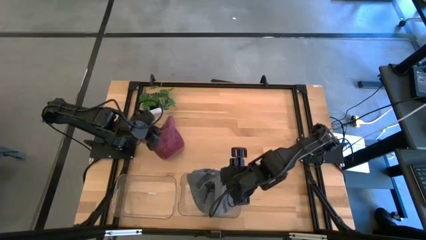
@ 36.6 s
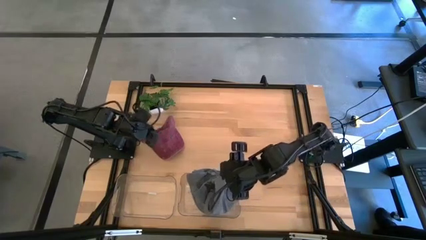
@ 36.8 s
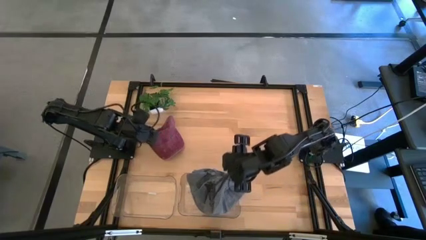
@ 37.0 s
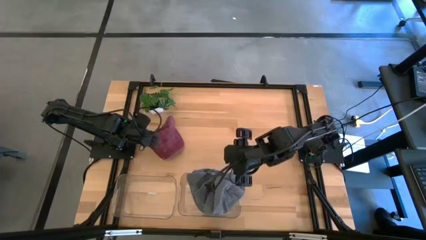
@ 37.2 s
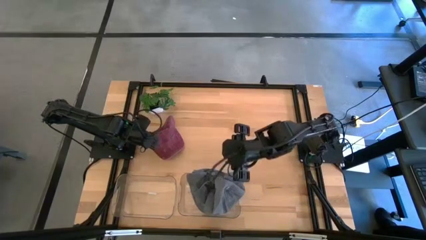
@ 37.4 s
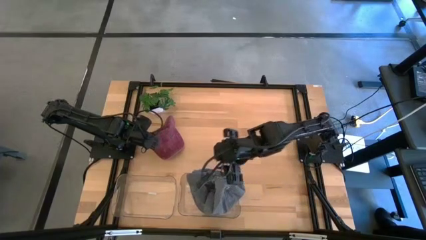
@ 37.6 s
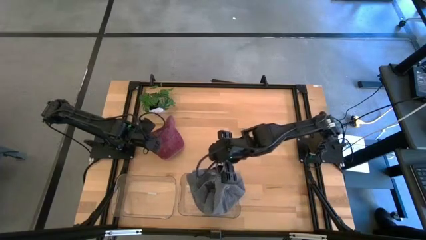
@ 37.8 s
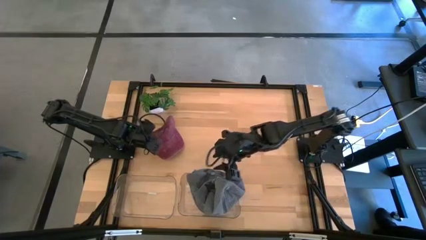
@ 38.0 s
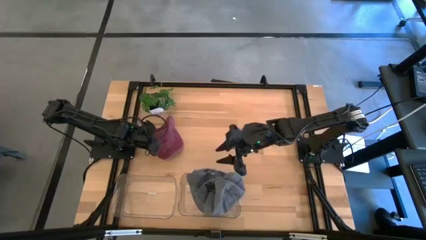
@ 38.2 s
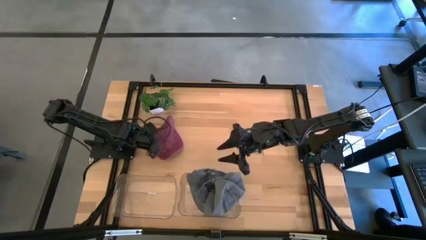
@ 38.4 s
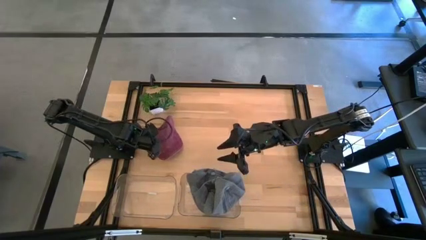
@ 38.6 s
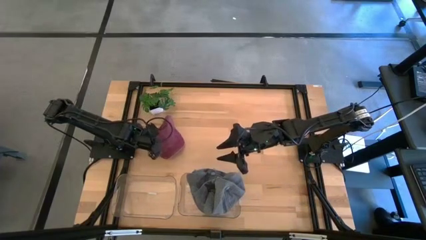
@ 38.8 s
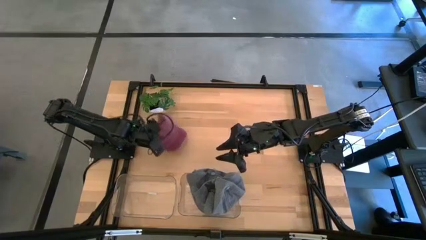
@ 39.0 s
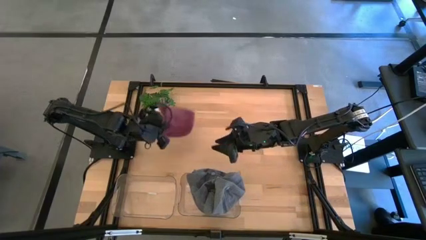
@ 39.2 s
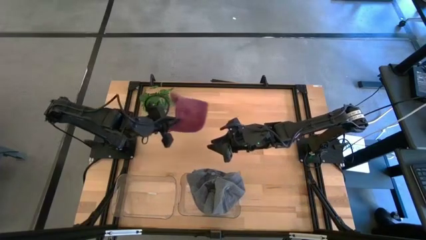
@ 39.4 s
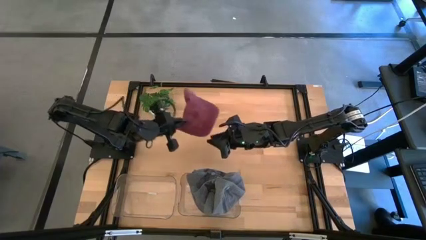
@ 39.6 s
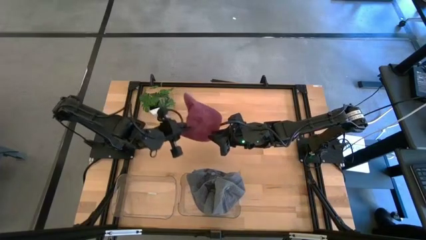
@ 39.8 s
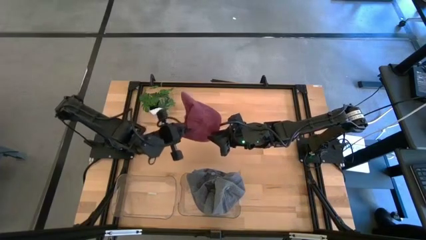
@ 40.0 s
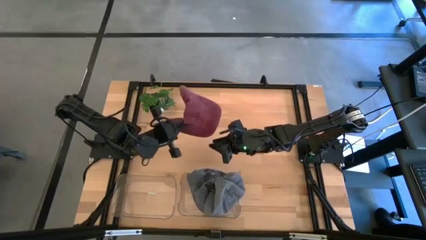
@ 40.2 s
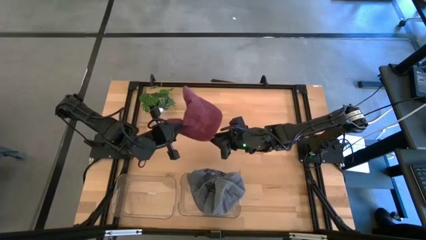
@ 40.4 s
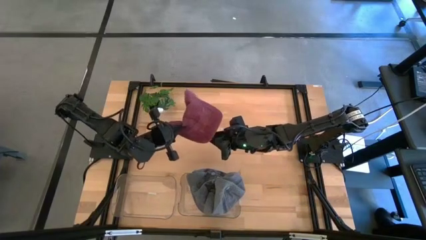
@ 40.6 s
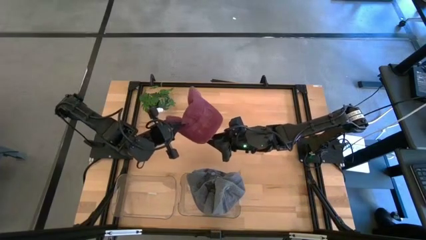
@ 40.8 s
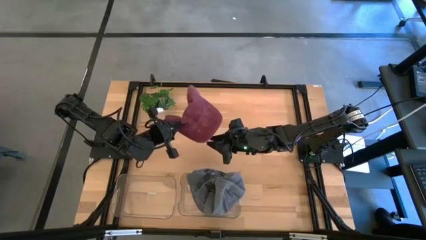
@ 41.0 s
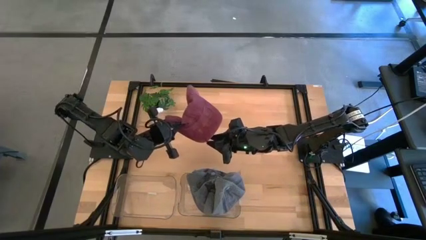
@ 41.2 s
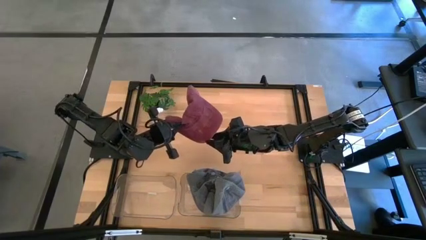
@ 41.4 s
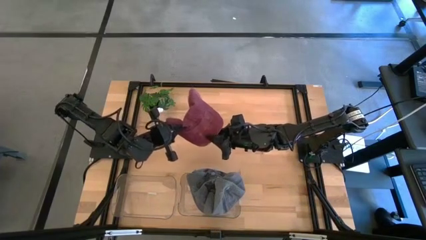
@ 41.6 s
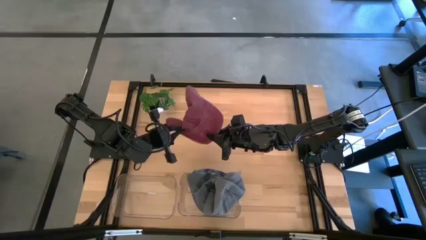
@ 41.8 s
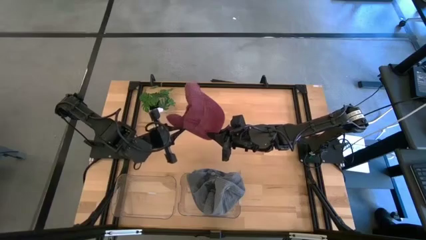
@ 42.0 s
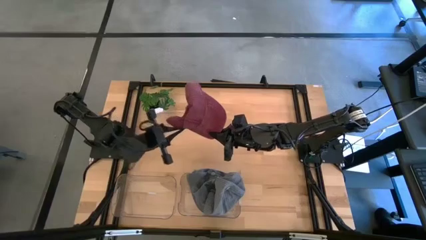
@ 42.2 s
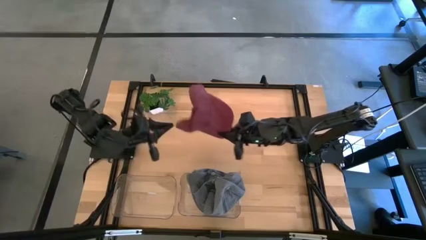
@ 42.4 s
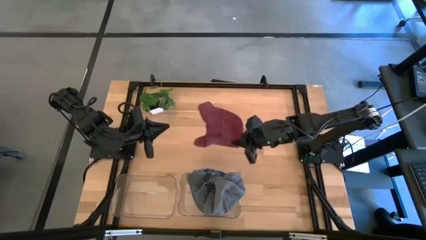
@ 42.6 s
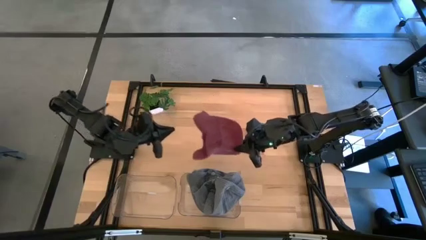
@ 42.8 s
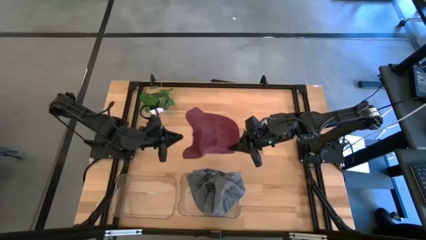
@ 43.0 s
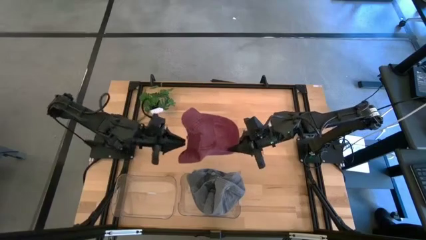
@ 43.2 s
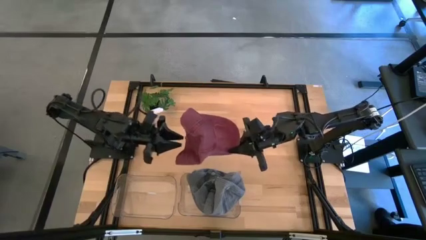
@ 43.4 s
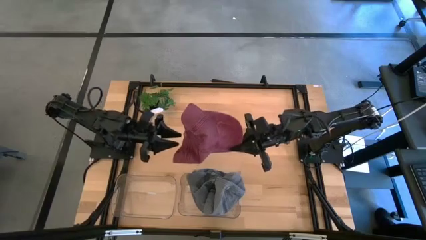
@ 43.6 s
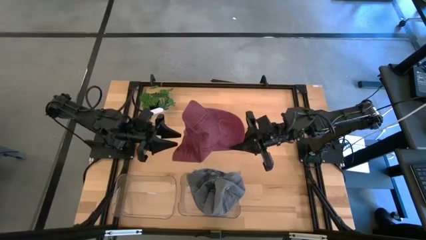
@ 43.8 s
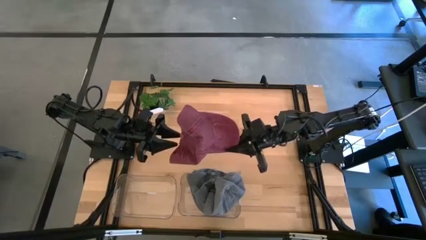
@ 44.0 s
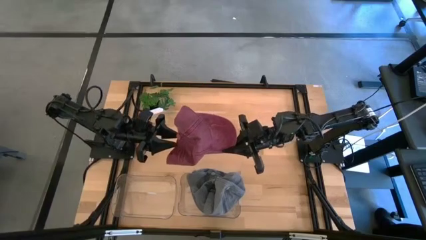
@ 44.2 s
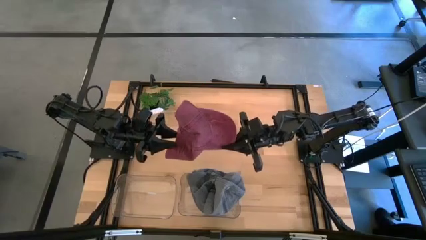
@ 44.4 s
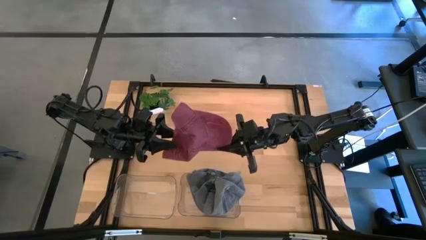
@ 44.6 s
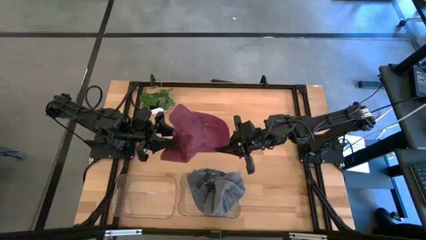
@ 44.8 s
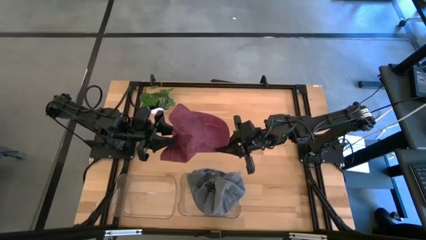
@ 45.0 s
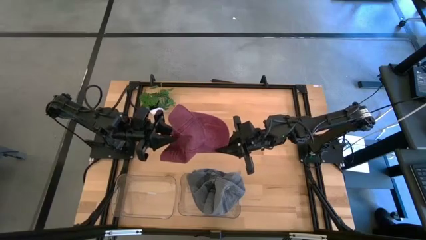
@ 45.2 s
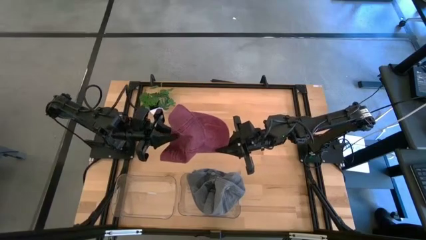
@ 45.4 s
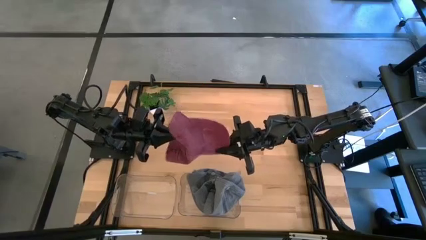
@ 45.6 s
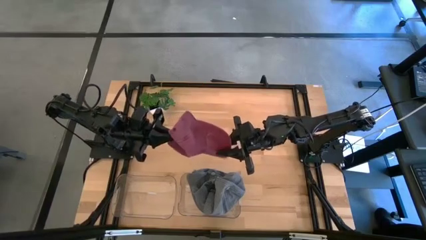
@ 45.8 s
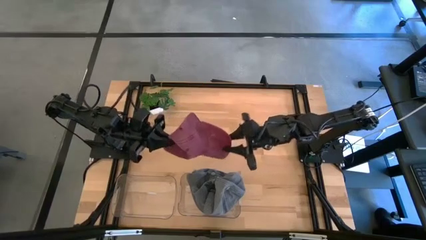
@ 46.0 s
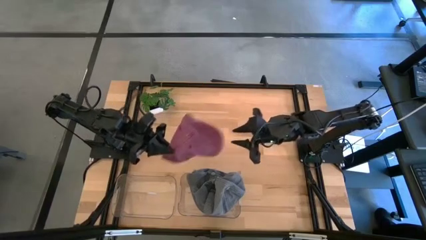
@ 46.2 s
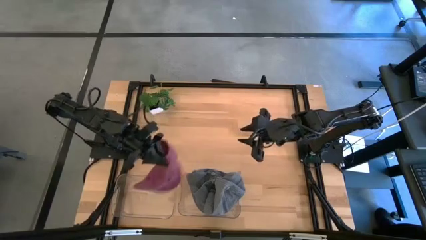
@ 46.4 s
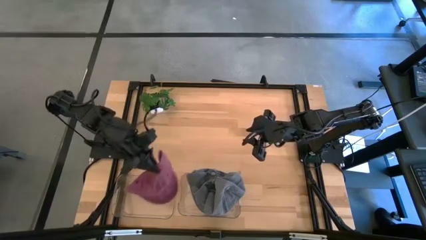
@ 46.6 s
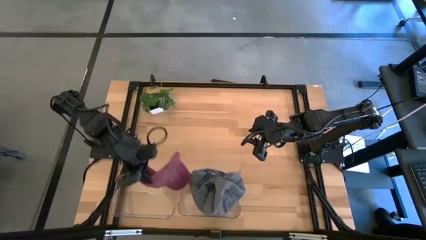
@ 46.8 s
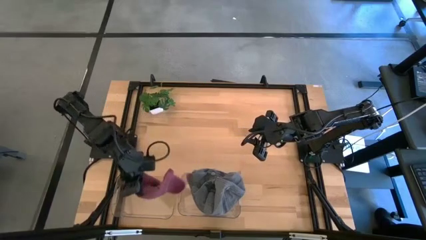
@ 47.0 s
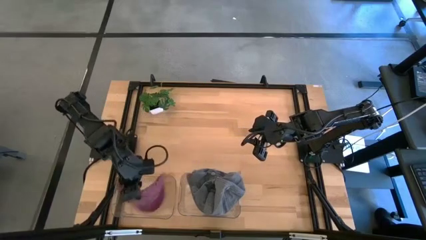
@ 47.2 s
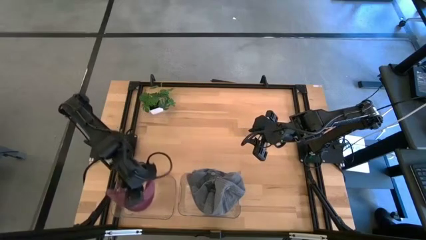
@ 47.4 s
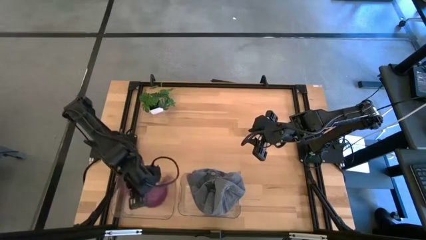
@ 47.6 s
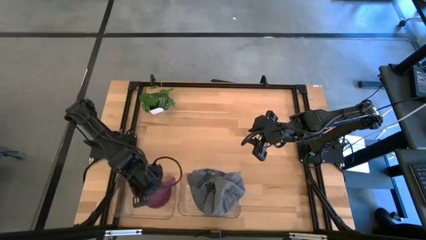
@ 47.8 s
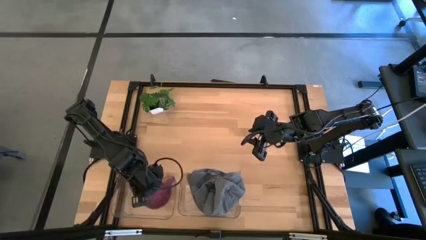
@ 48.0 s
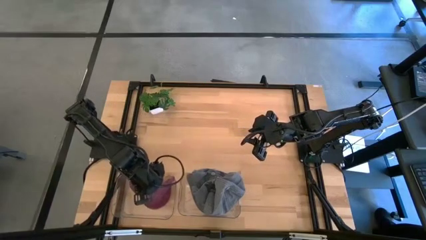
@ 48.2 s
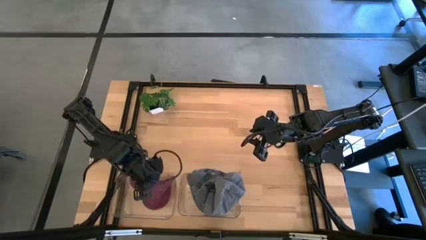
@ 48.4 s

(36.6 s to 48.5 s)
Task: Pick & Place hat
Put the red cap into the left transparent bin

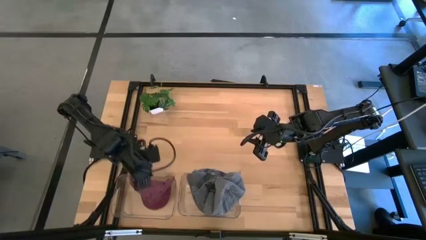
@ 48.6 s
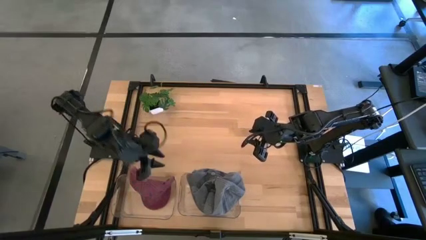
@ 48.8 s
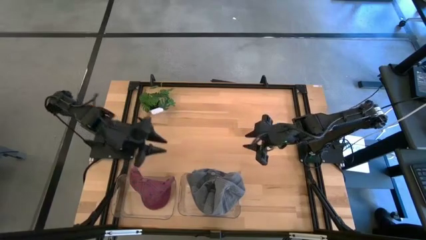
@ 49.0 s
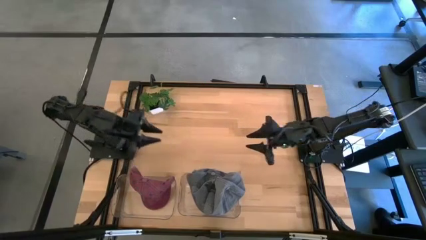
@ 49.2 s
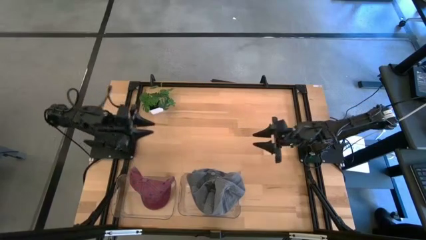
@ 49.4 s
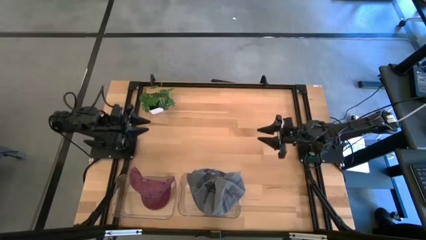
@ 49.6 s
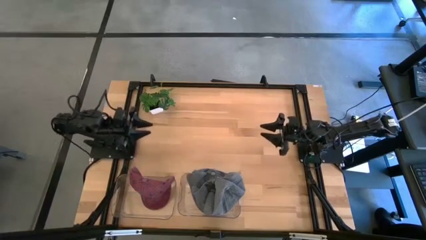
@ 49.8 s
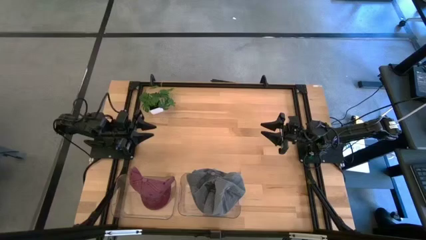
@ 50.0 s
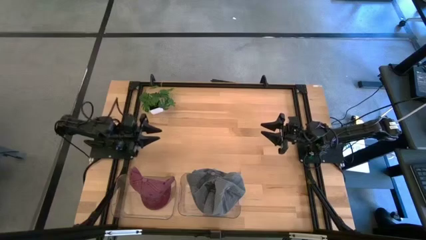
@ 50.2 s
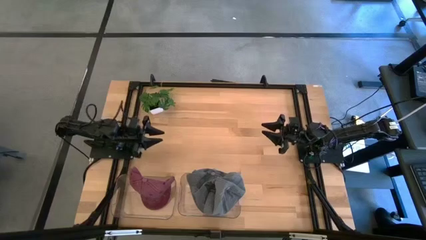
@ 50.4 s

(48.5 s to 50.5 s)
Return to Home Position

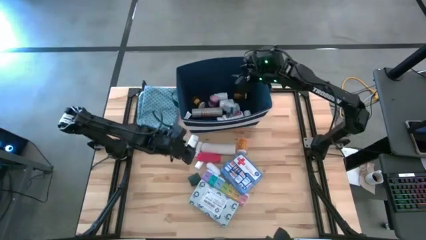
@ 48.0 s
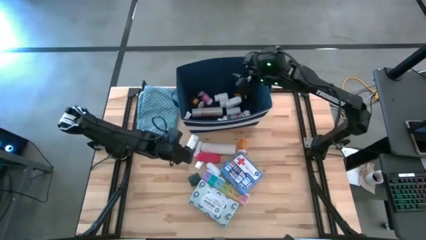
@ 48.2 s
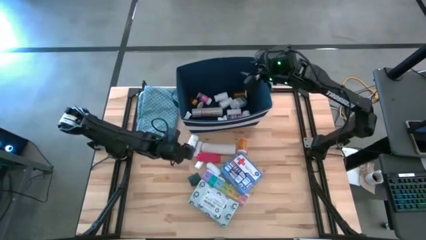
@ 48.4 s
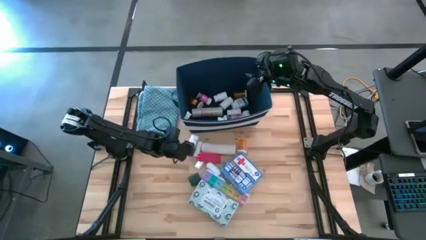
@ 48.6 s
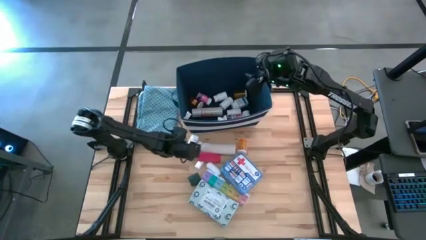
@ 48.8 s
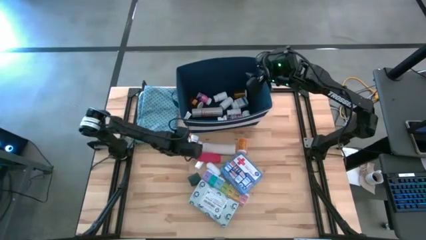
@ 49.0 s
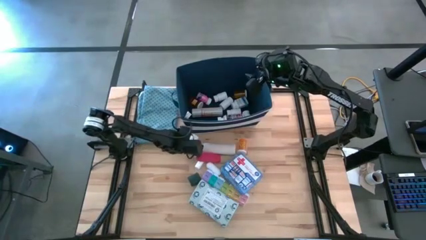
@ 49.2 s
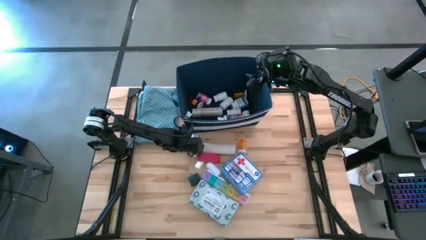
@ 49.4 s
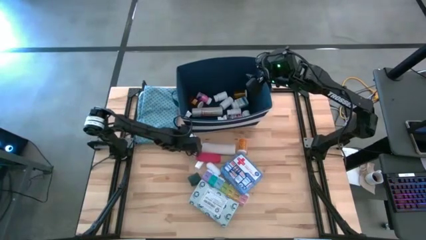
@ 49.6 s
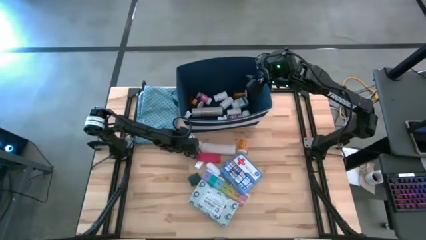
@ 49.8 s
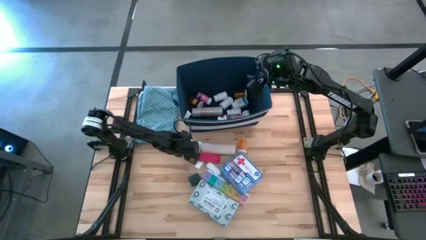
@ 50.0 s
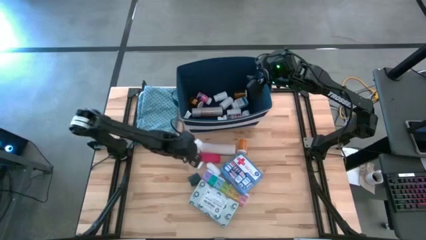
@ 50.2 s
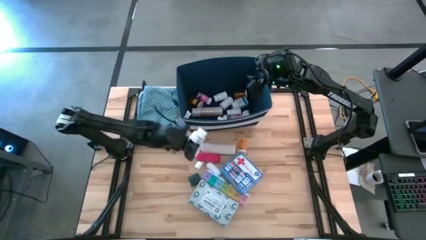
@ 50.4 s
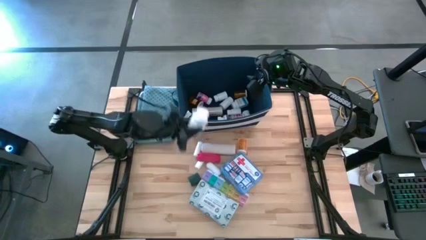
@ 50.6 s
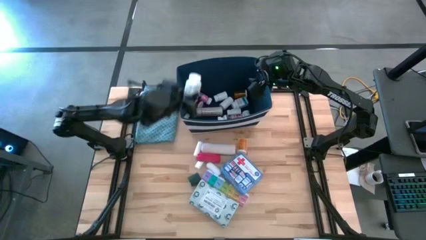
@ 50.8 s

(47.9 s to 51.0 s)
Task: Pick & place medical supplies in basket/bin
Put the blue pill bottle into the blue bin
